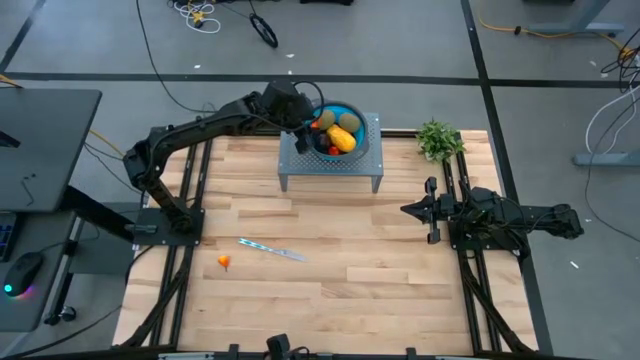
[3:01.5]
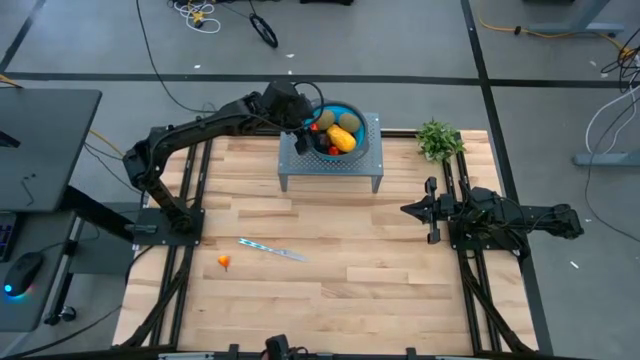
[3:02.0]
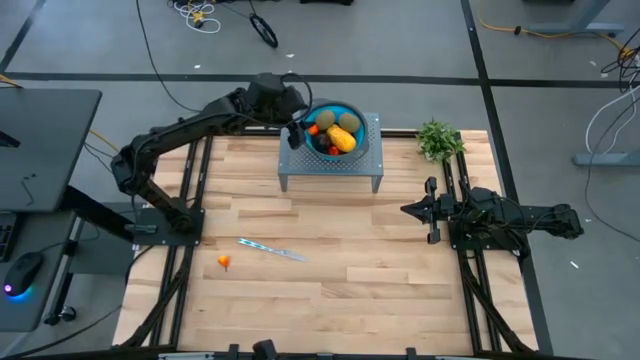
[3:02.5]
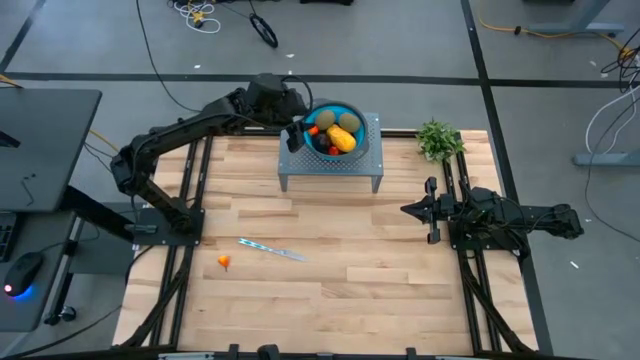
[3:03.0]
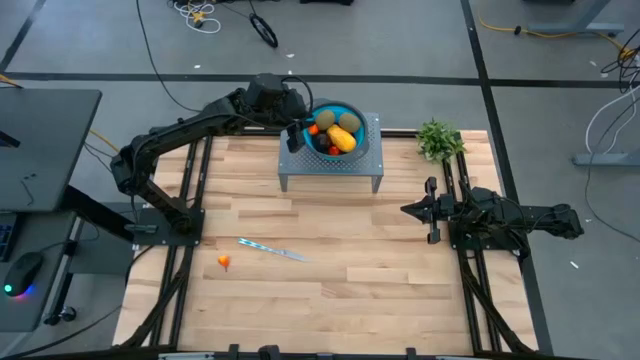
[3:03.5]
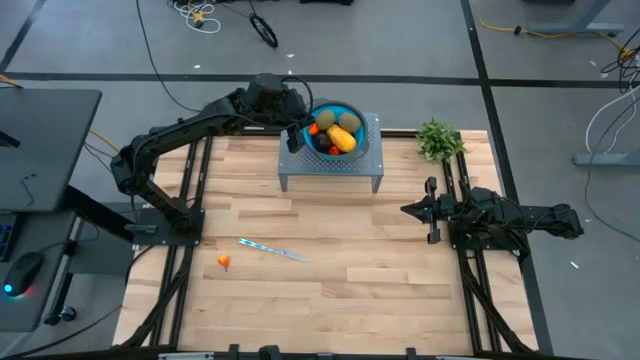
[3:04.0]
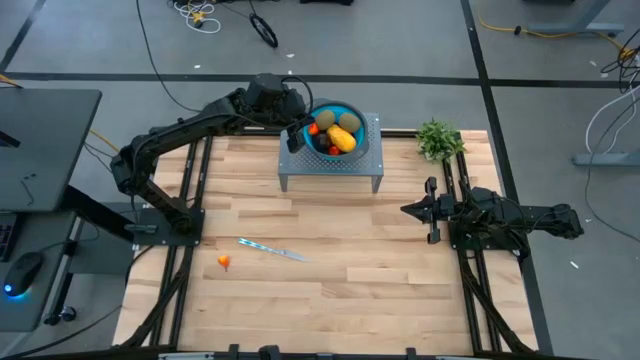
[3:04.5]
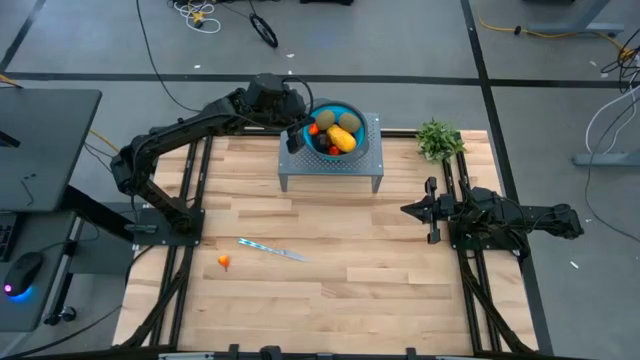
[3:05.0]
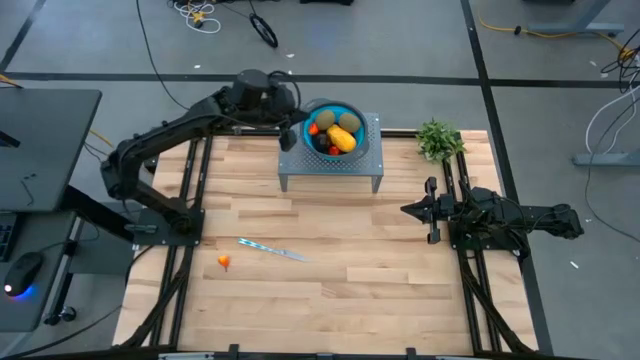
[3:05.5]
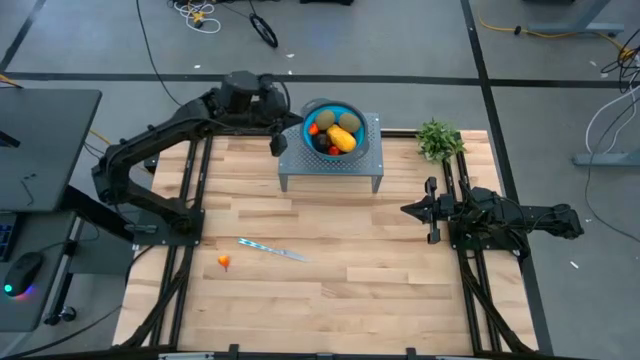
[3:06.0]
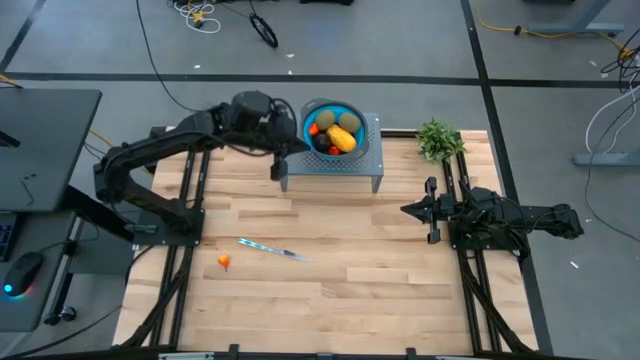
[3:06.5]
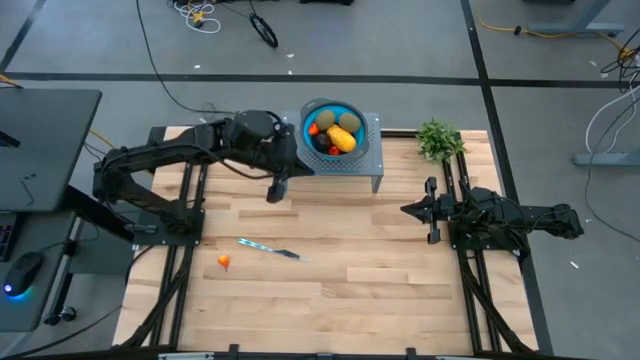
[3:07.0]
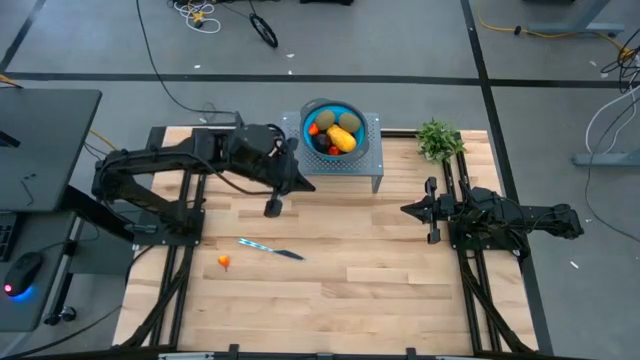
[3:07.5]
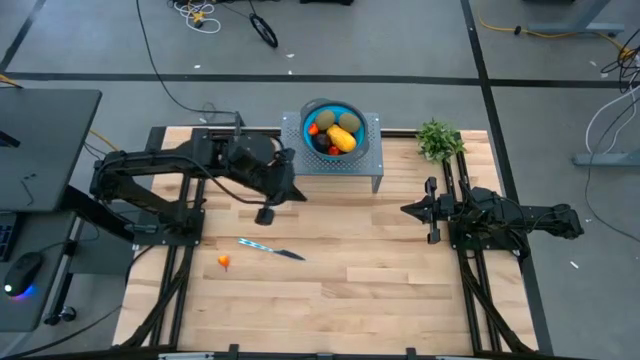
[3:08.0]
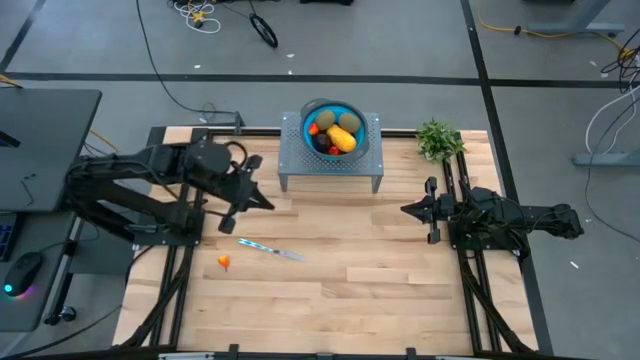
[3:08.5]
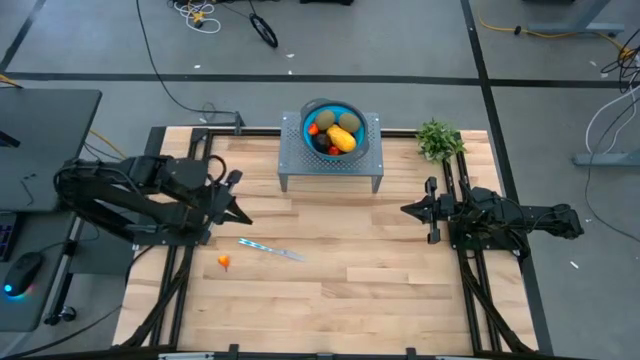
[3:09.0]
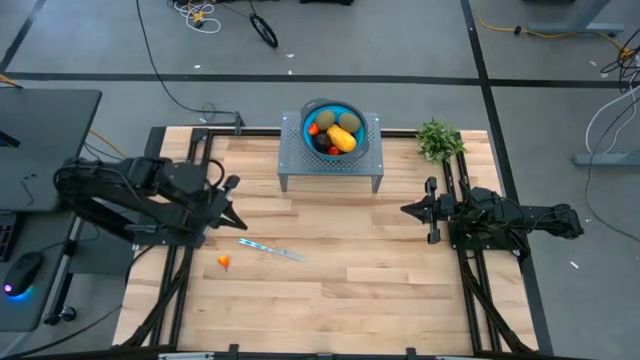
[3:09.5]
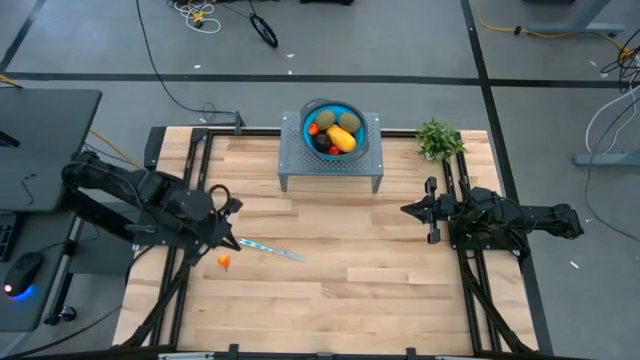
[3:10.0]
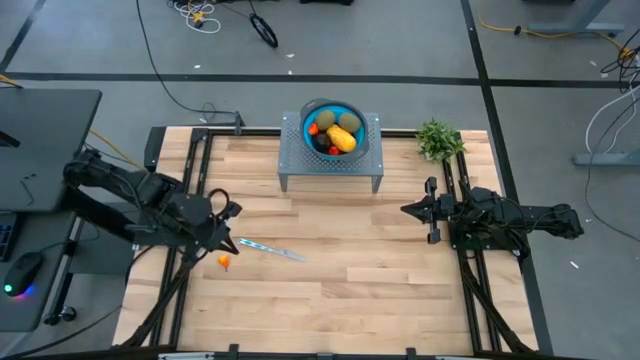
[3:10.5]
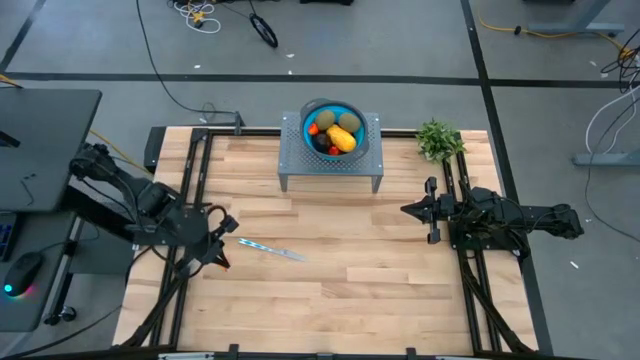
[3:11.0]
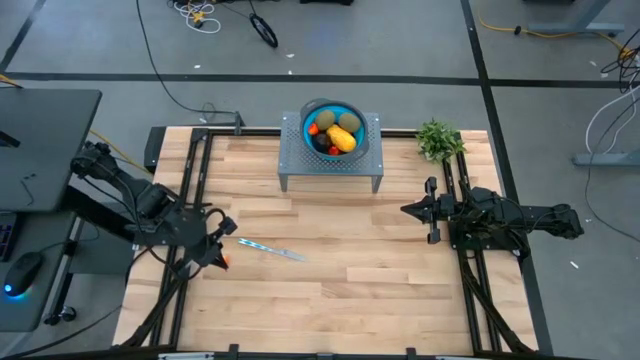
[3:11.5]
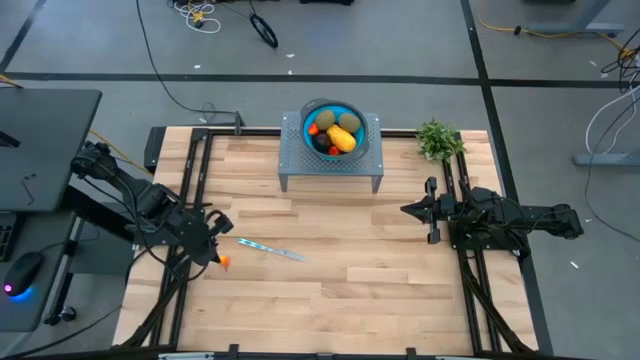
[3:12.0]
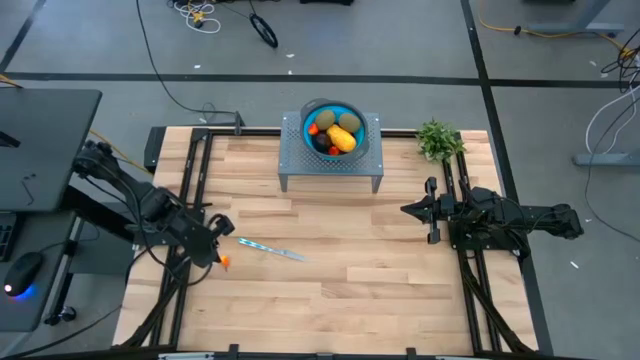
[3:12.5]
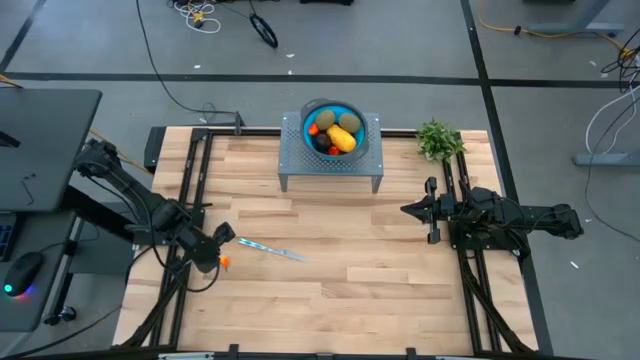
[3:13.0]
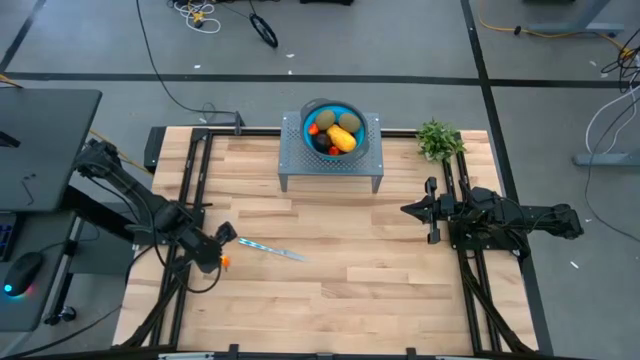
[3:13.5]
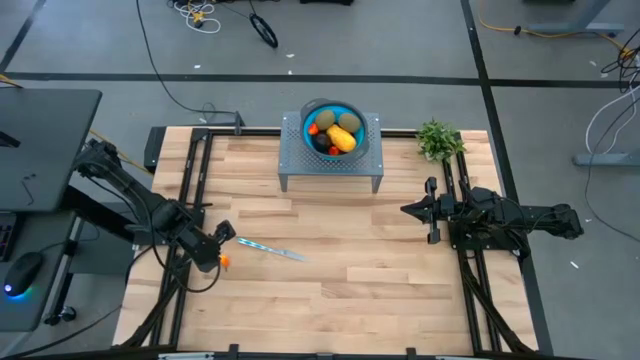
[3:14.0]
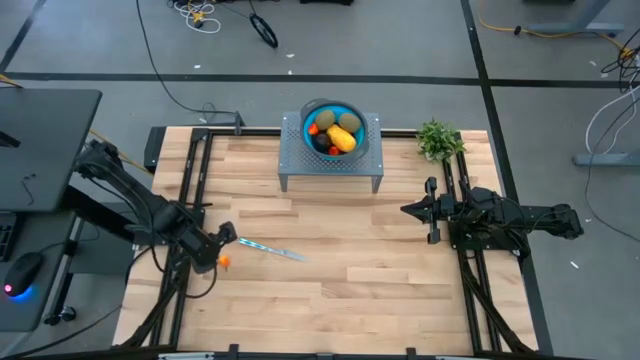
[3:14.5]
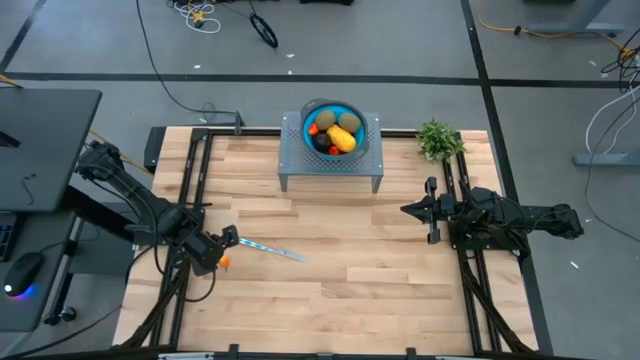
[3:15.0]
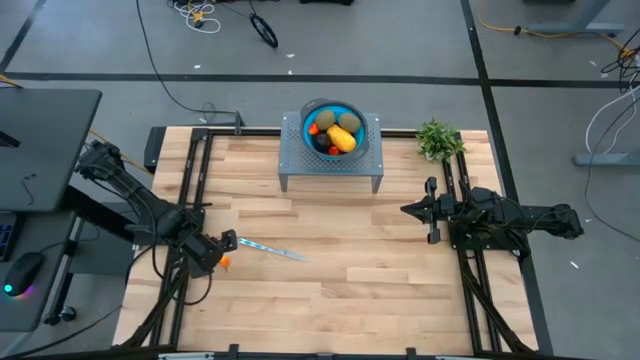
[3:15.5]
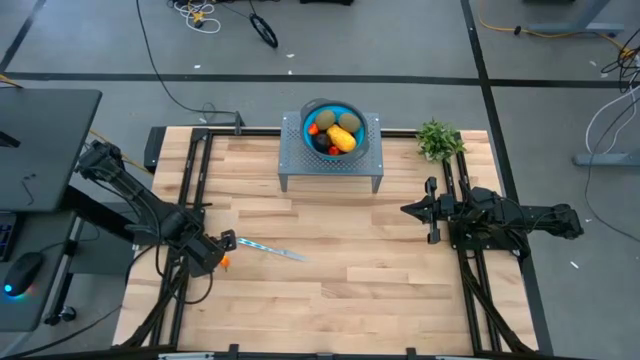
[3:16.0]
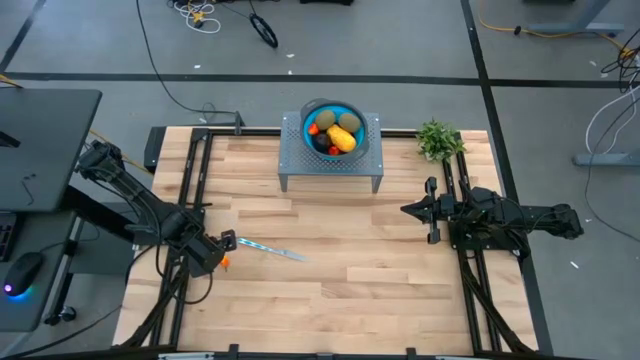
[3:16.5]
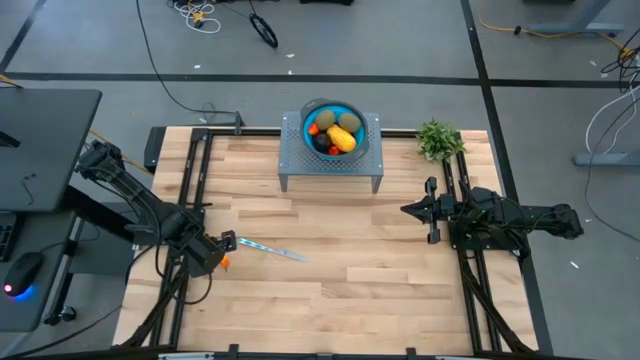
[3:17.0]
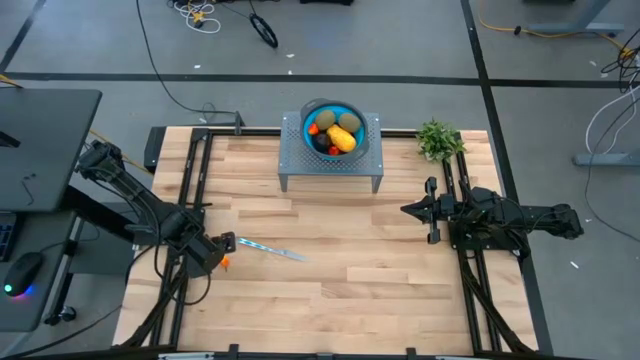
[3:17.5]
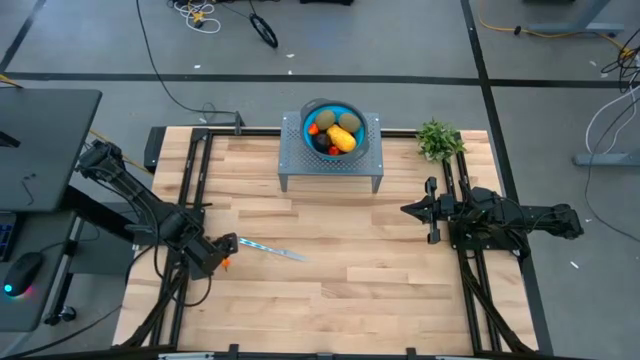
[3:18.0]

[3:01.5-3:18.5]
Task: Pick & Place Fruit
Put the peach into the blue bin
